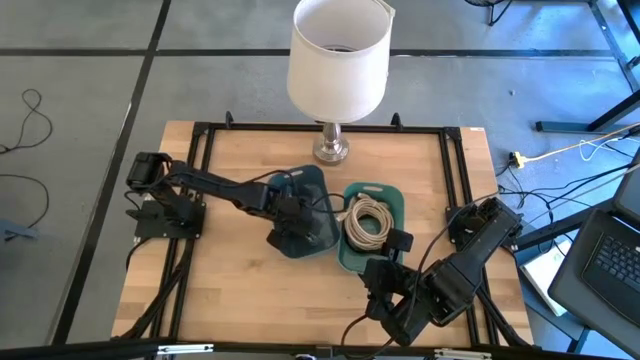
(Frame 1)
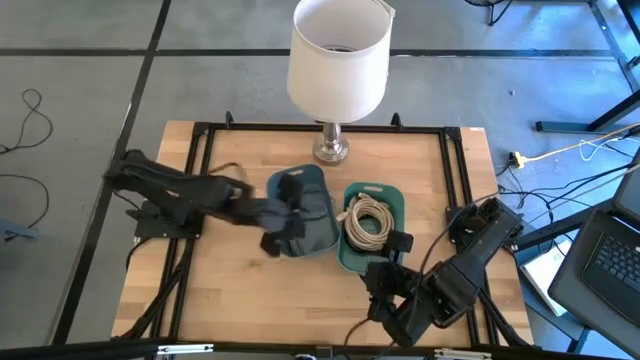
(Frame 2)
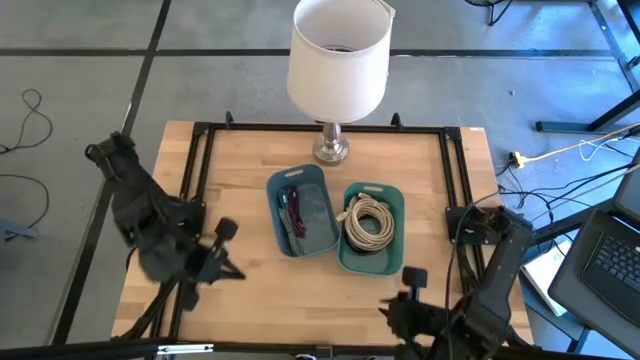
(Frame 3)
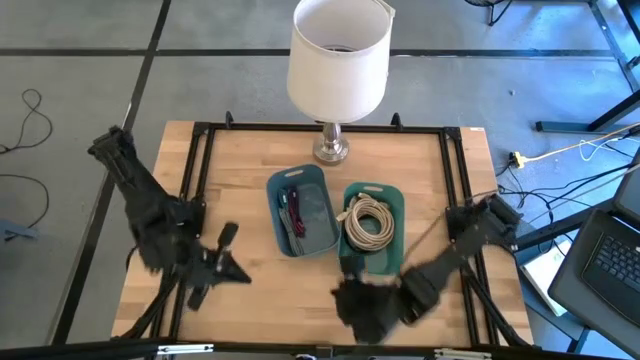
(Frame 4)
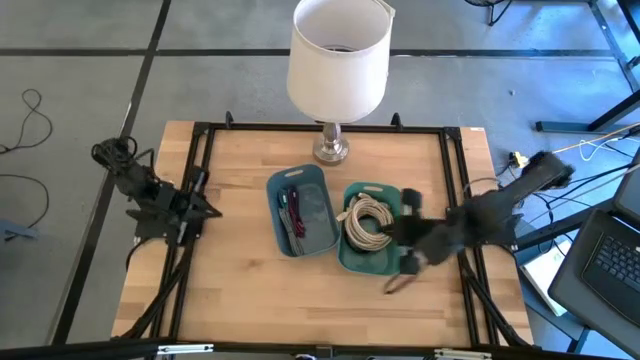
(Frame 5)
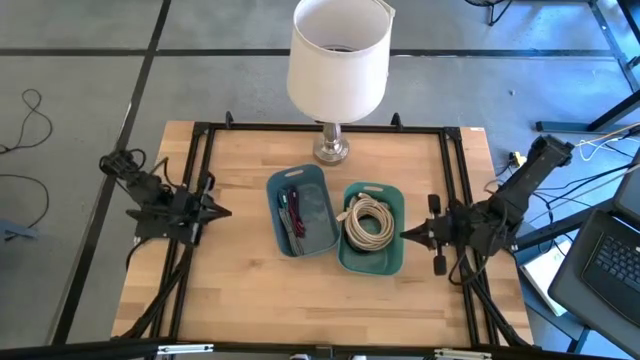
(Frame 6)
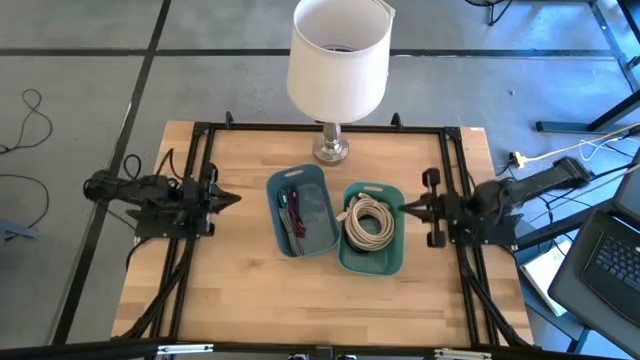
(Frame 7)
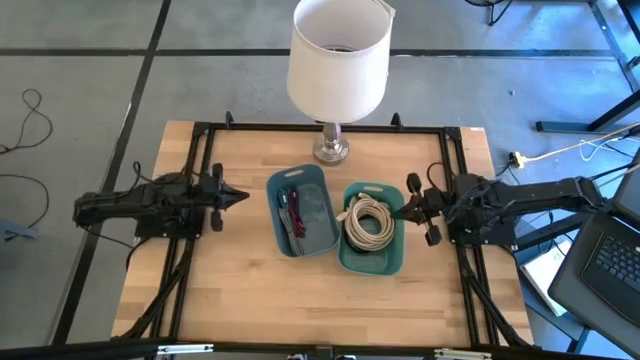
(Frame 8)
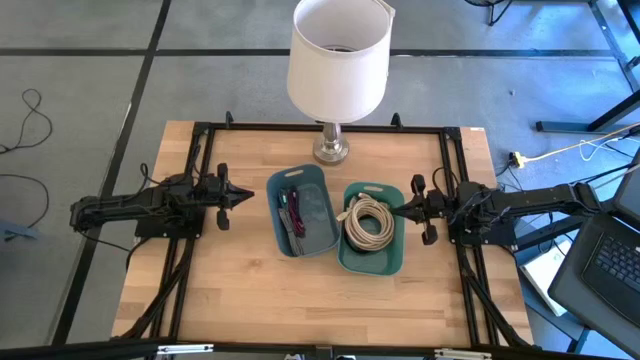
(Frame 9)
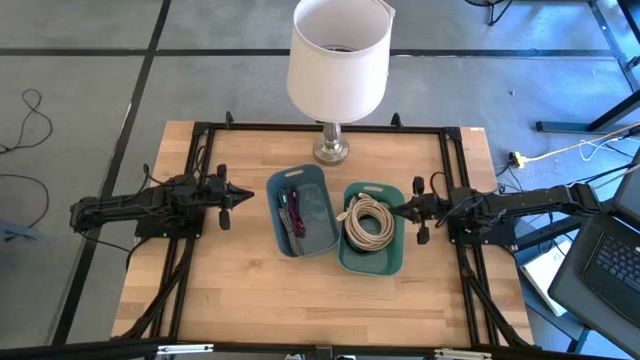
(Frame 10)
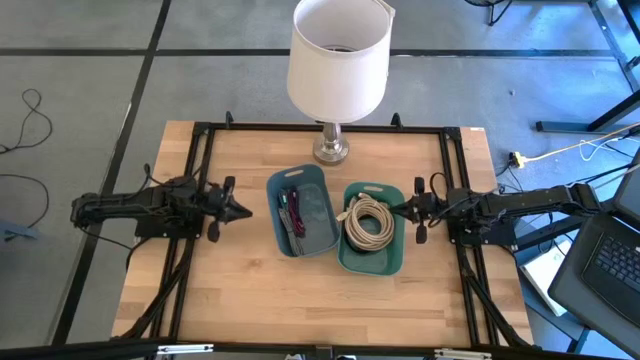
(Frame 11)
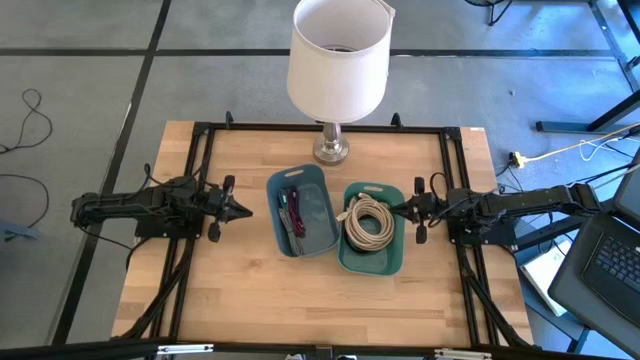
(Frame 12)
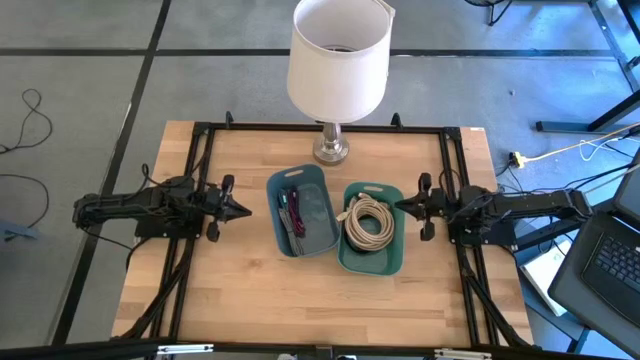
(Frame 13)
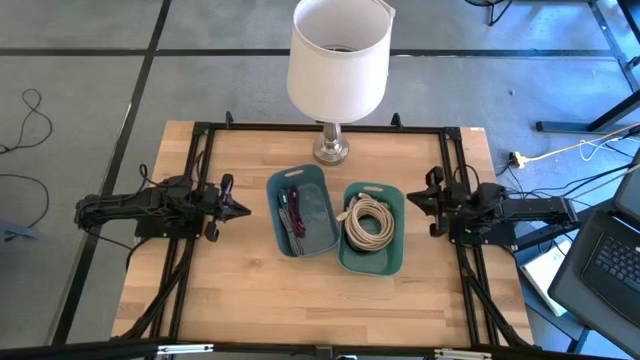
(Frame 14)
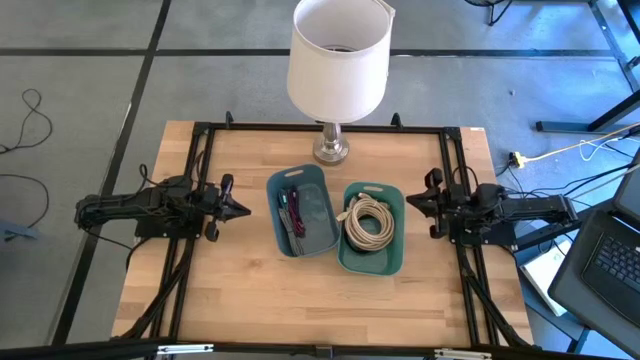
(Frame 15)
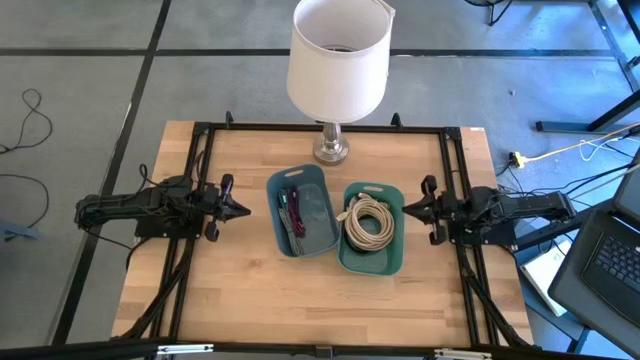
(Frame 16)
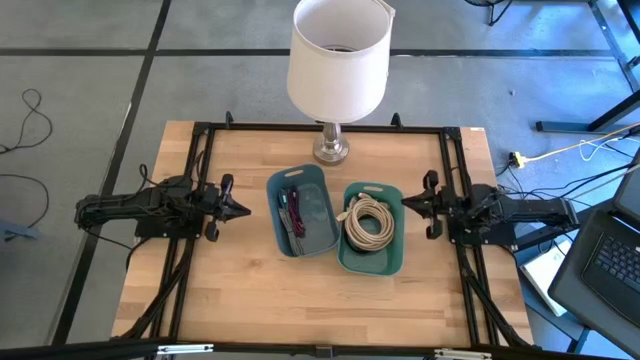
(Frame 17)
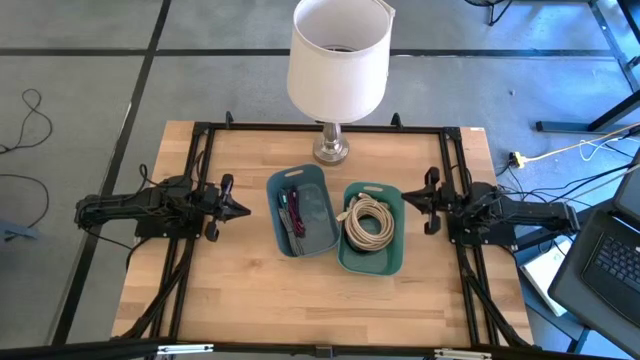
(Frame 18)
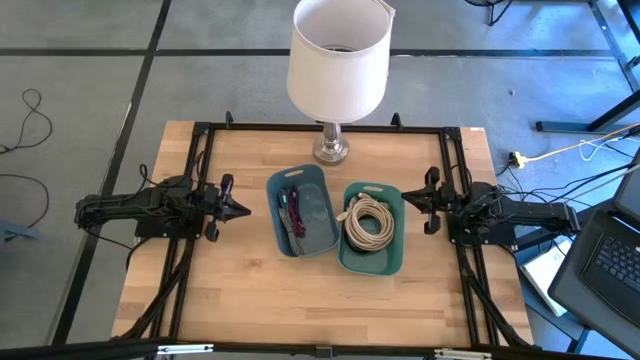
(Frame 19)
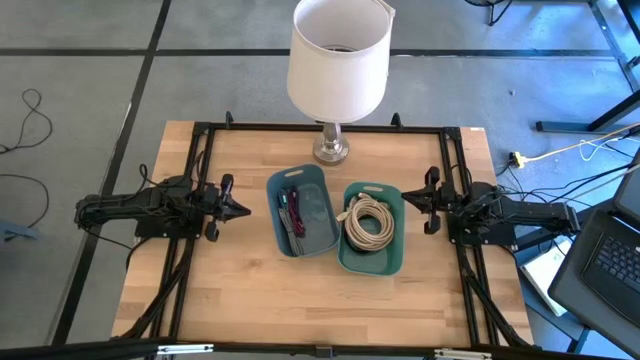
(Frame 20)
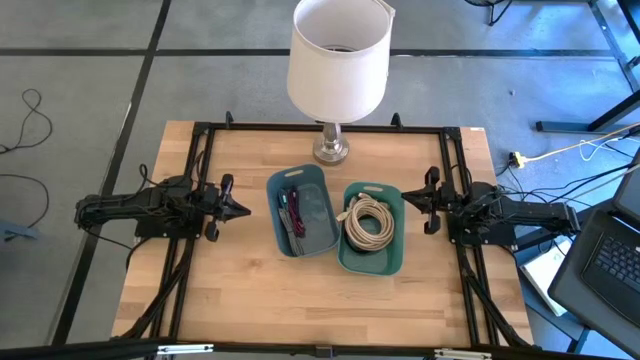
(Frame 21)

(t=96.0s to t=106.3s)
Task: Pick and place items into bin
Return to Home Position

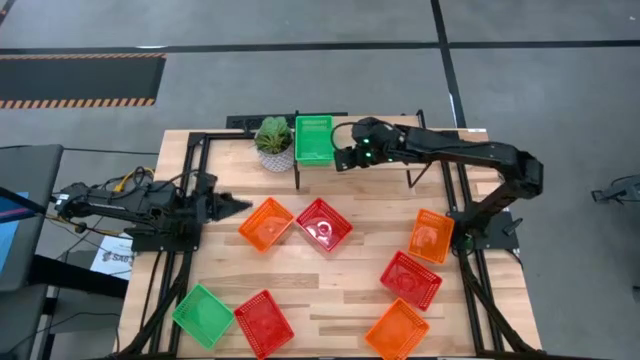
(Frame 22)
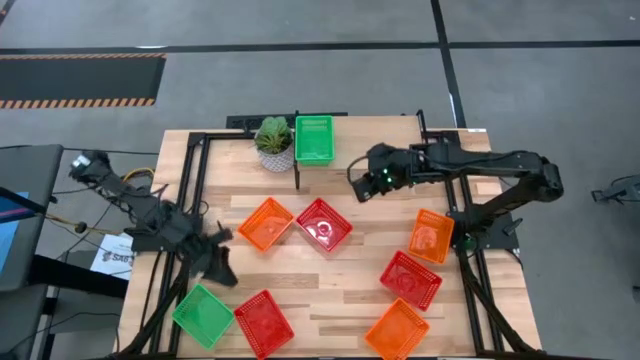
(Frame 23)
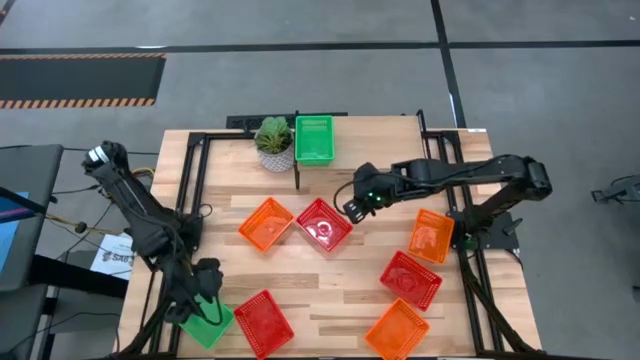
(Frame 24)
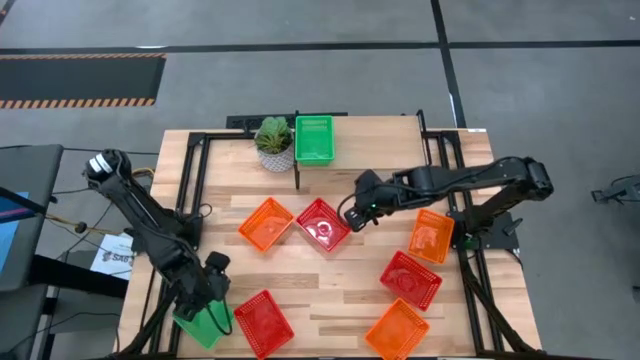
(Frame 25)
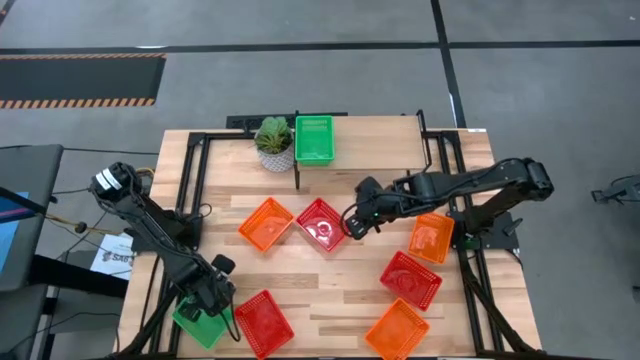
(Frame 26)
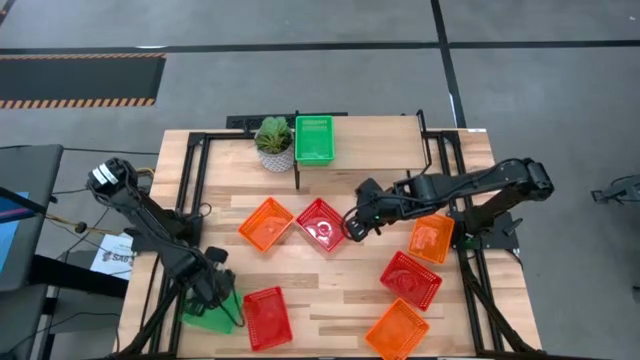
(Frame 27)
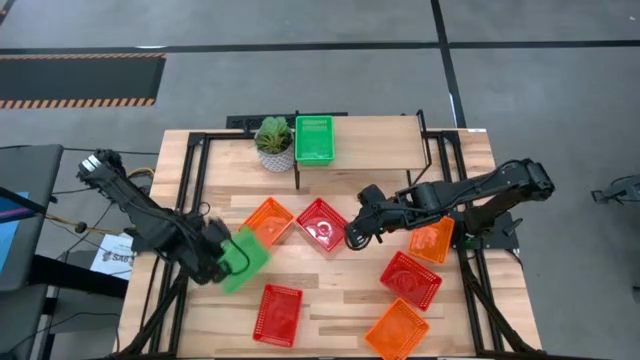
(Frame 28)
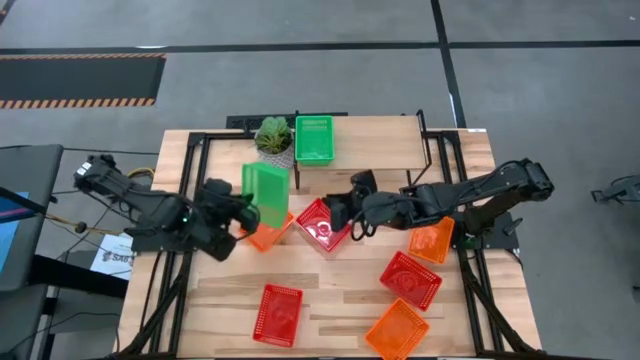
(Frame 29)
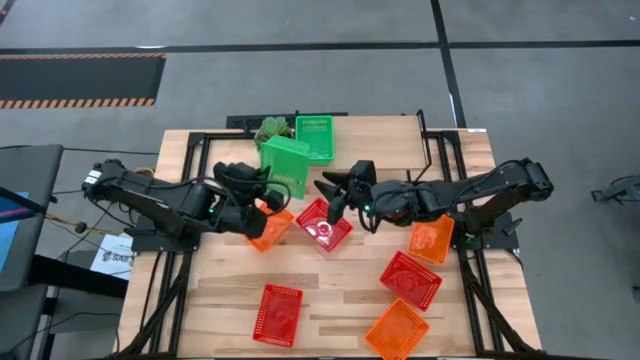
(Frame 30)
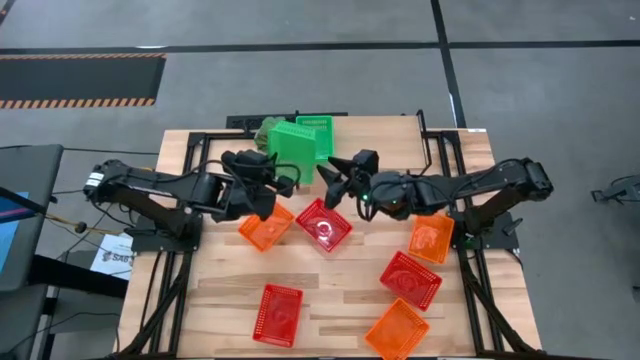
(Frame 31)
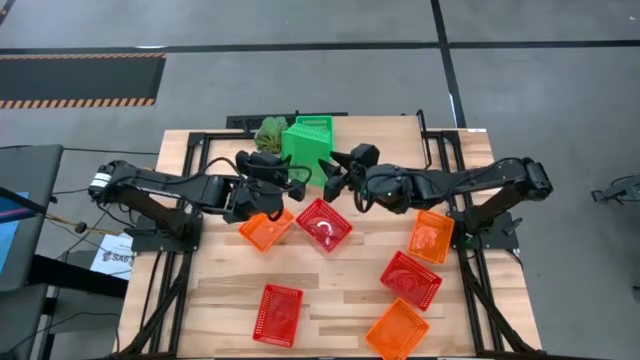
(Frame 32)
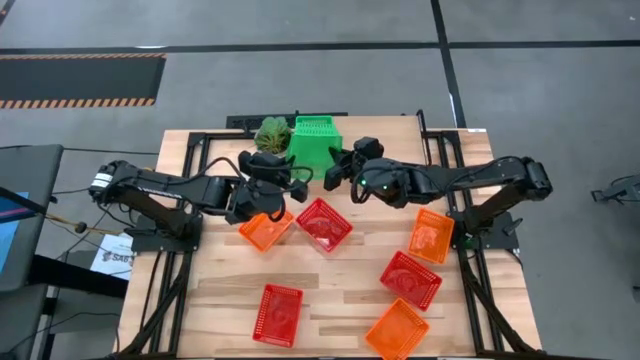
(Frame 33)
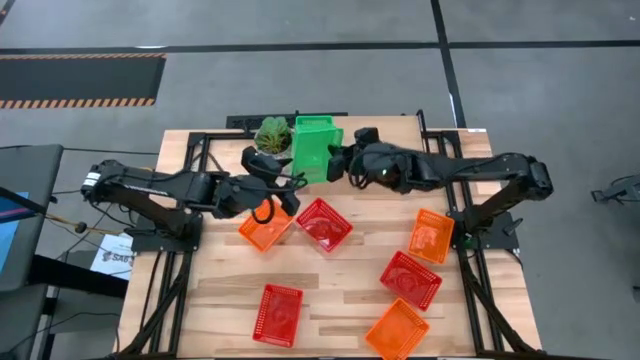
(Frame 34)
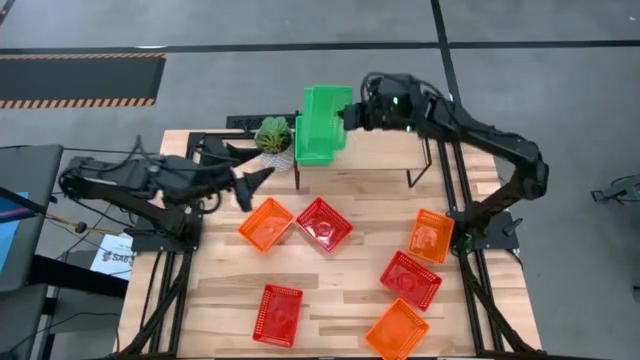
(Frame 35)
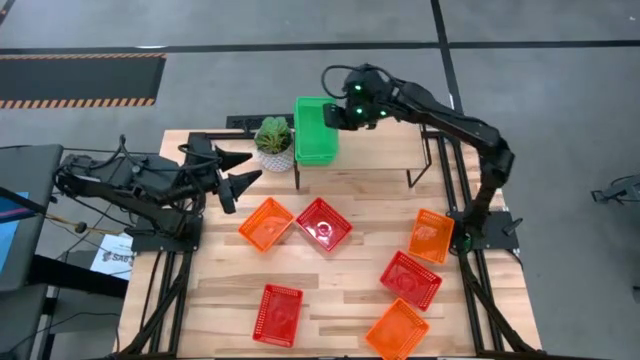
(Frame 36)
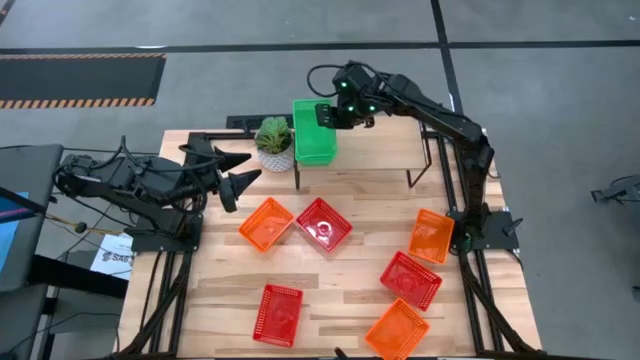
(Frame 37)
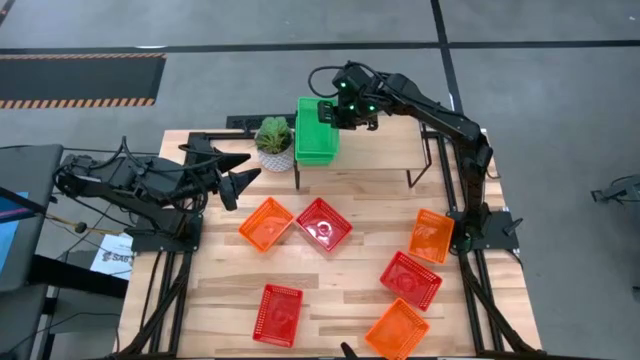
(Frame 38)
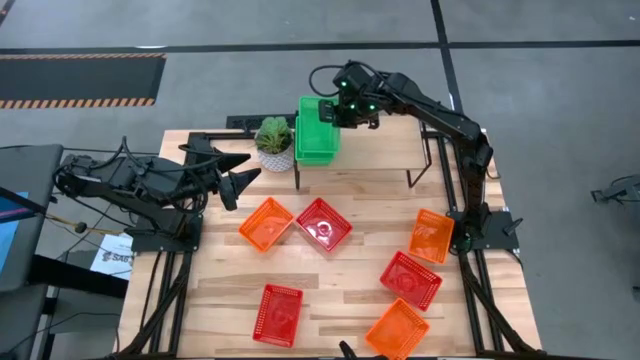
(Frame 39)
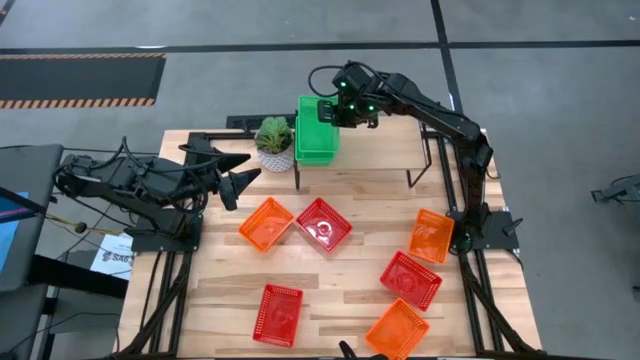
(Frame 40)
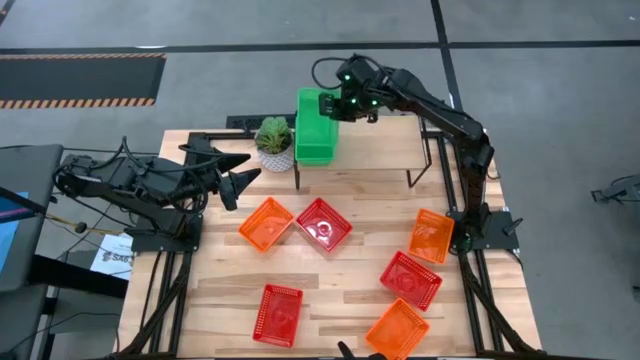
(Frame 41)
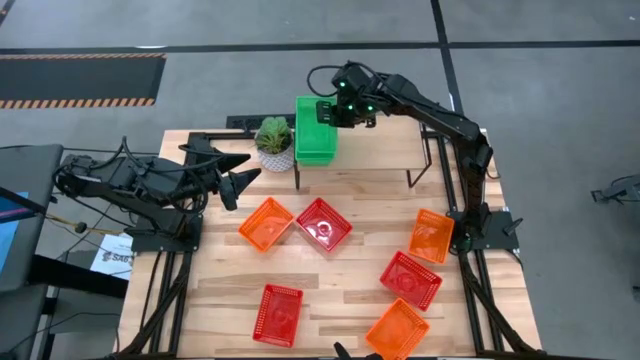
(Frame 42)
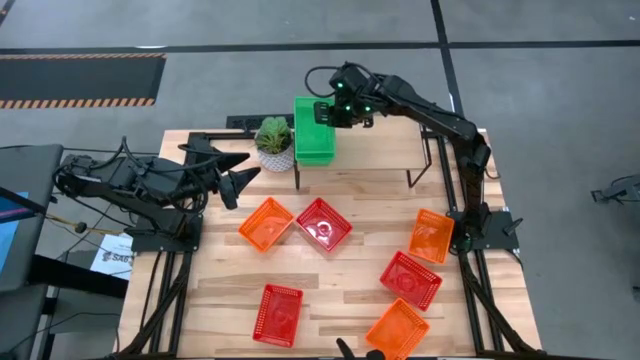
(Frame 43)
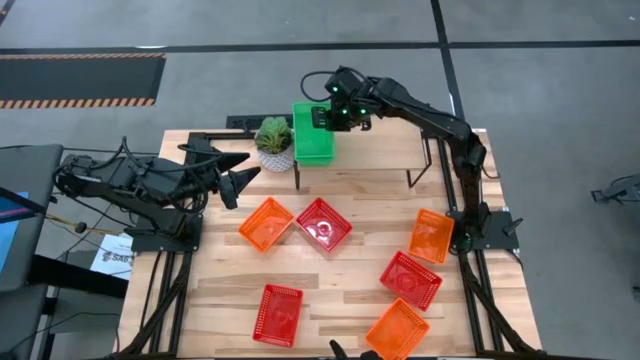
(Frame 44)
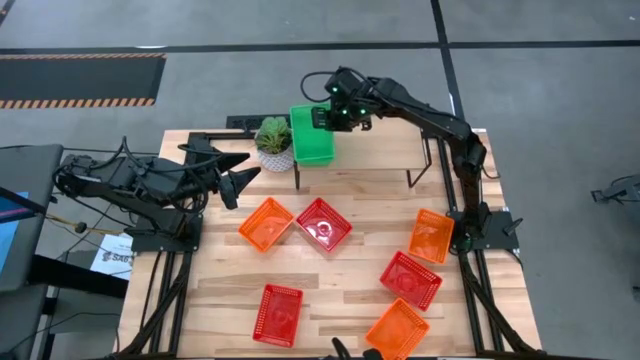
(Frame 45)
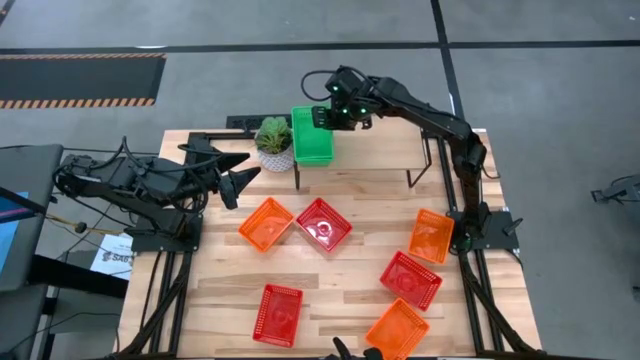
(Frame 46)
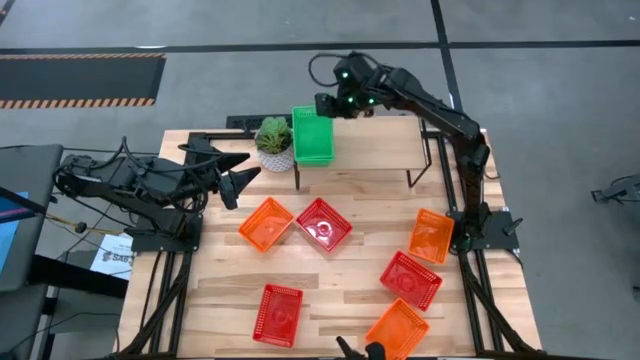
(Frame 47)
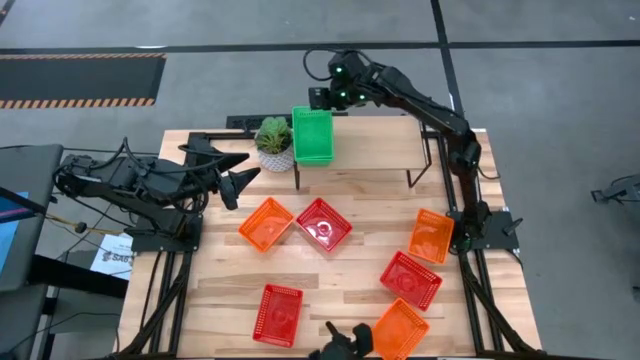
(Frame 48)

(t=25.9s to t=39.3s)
Task: Stack baskets on shelf by color
Stack the green bin on top of the green bins on the shelf
